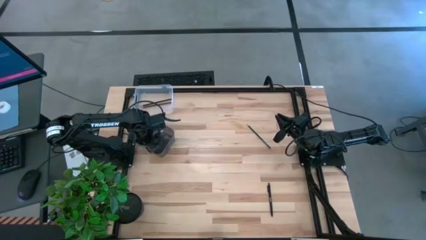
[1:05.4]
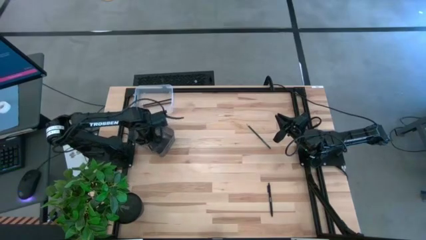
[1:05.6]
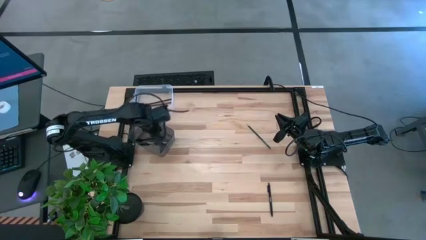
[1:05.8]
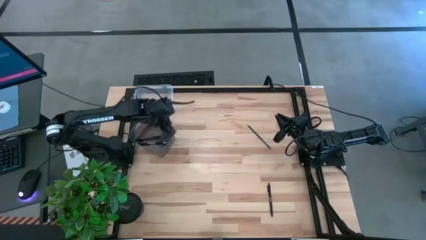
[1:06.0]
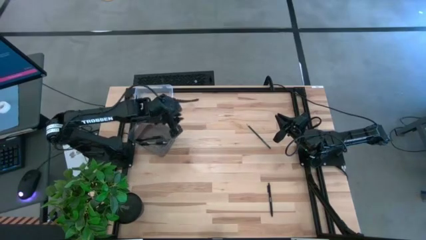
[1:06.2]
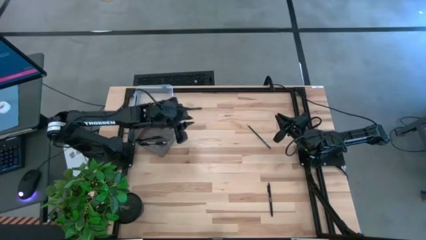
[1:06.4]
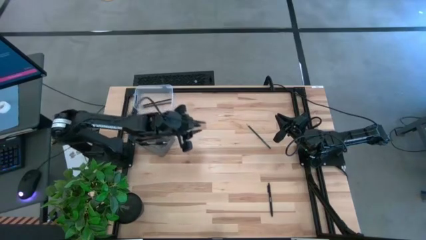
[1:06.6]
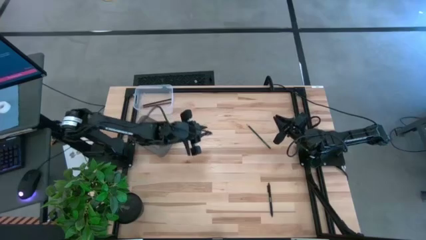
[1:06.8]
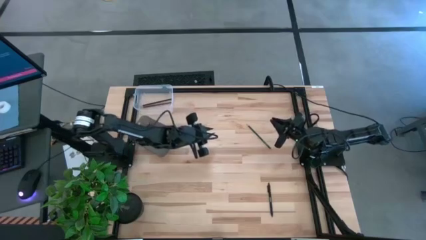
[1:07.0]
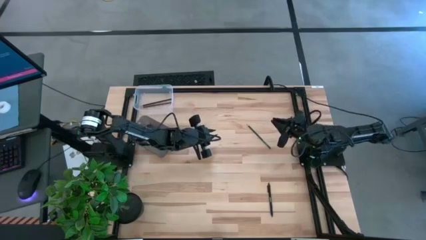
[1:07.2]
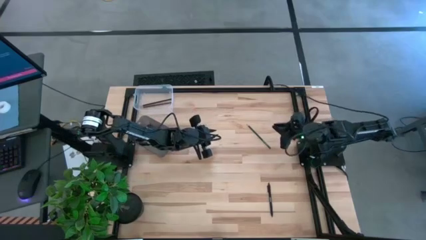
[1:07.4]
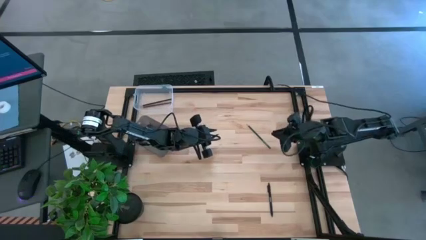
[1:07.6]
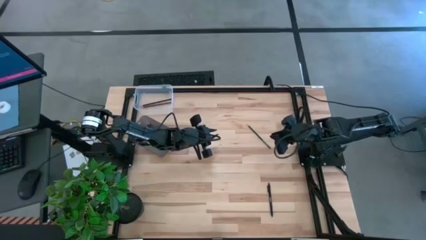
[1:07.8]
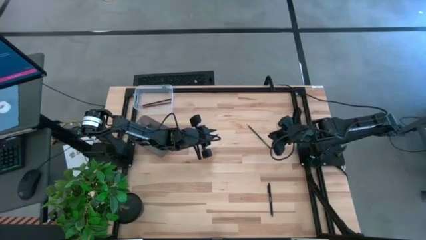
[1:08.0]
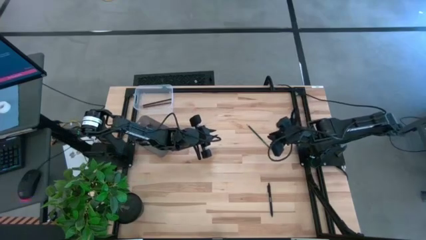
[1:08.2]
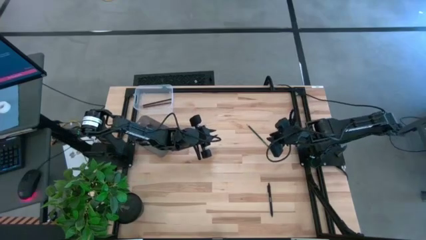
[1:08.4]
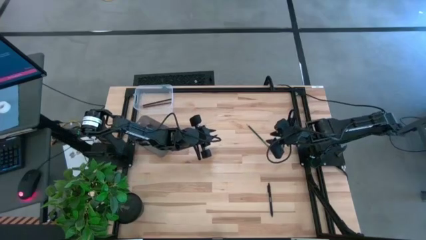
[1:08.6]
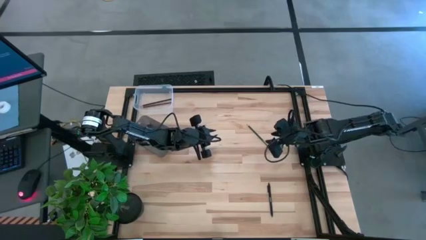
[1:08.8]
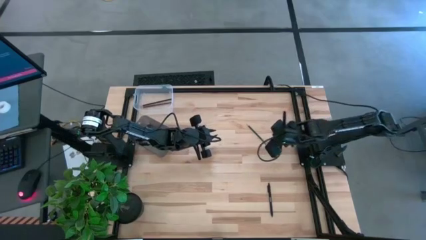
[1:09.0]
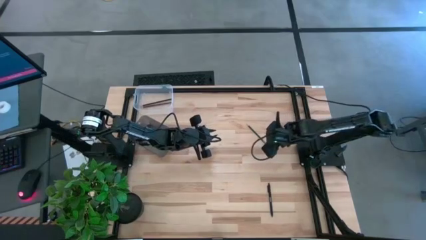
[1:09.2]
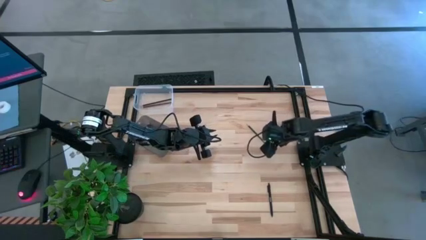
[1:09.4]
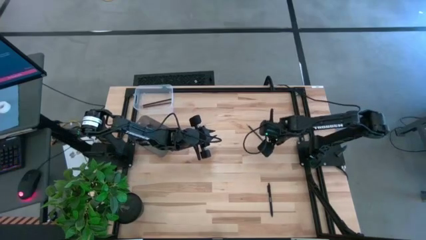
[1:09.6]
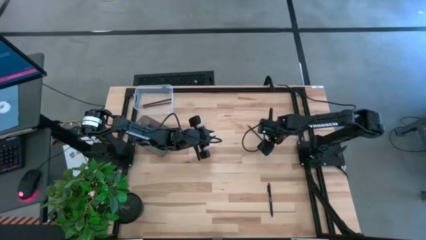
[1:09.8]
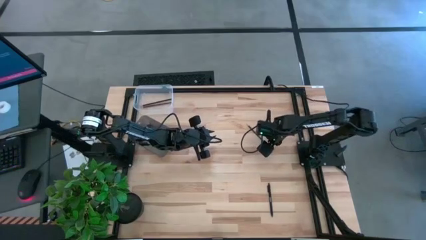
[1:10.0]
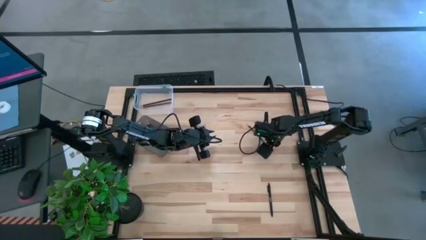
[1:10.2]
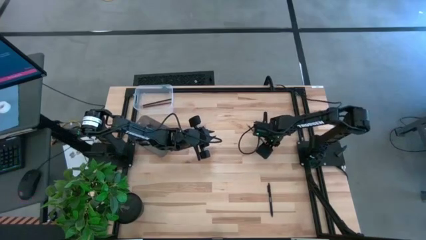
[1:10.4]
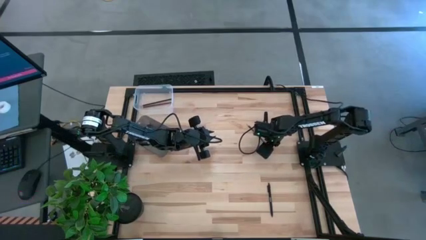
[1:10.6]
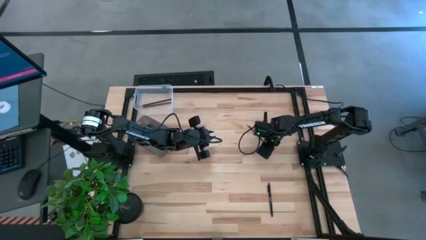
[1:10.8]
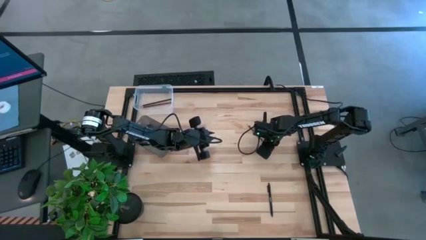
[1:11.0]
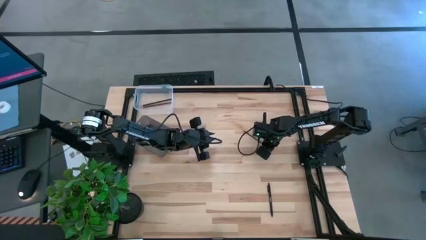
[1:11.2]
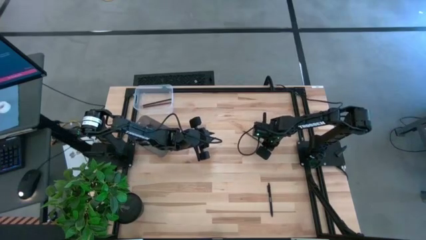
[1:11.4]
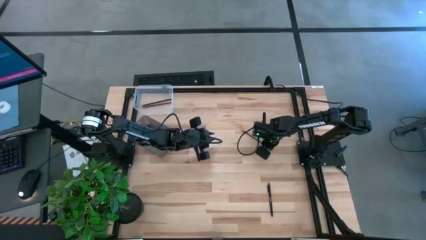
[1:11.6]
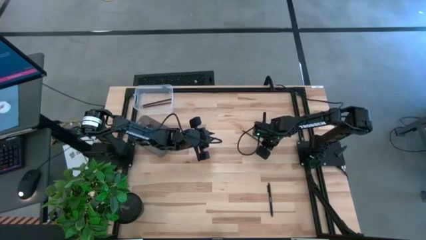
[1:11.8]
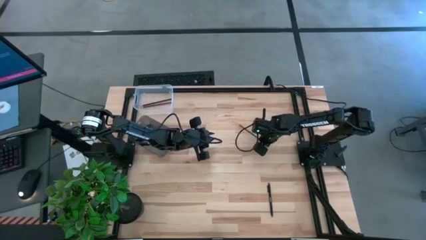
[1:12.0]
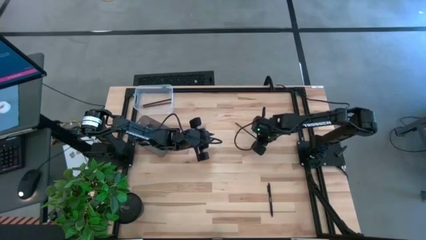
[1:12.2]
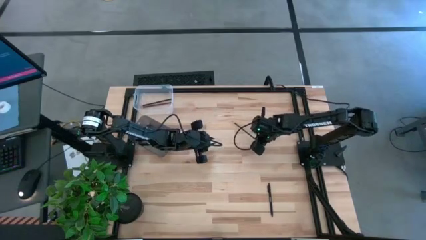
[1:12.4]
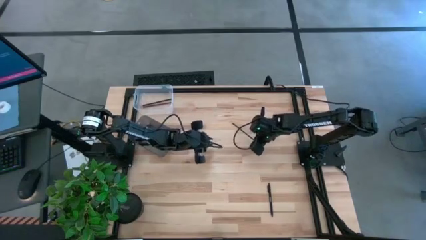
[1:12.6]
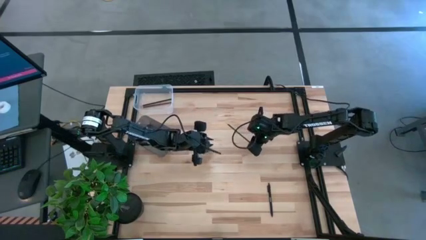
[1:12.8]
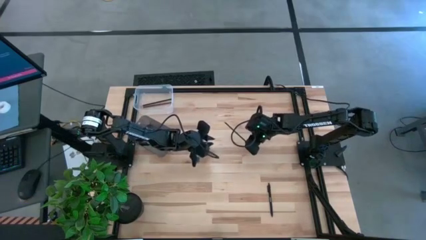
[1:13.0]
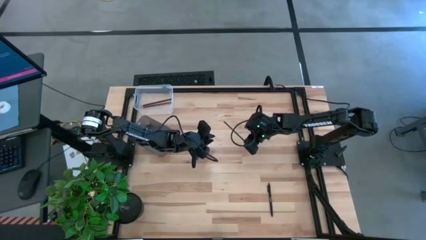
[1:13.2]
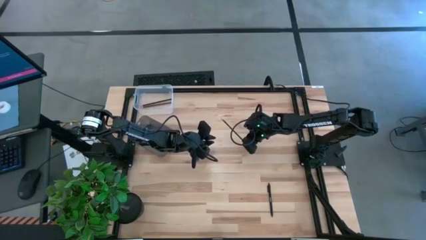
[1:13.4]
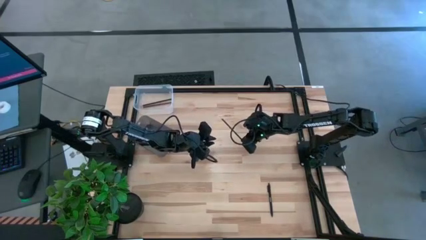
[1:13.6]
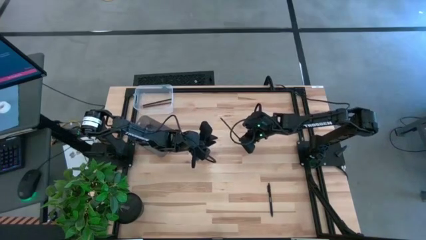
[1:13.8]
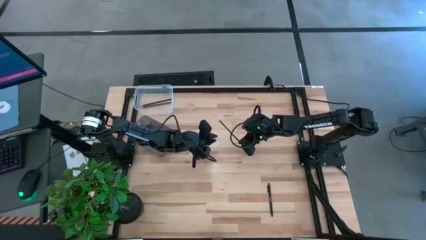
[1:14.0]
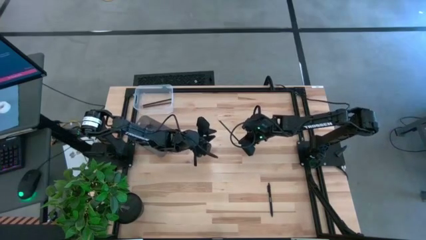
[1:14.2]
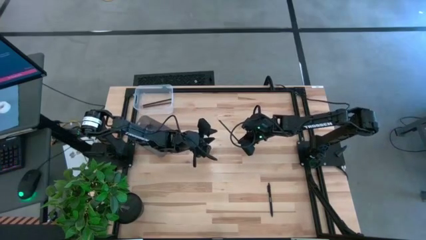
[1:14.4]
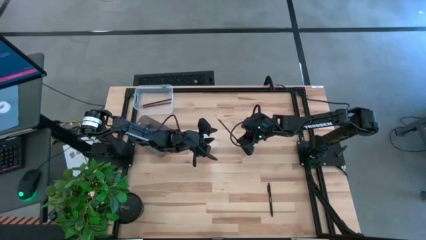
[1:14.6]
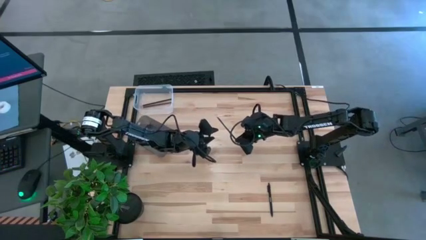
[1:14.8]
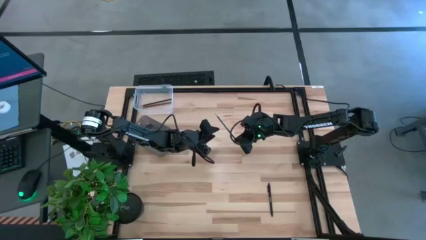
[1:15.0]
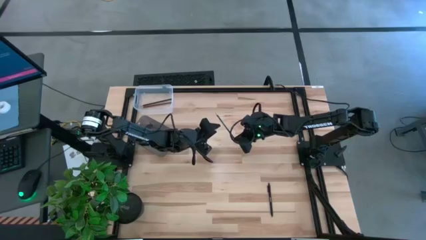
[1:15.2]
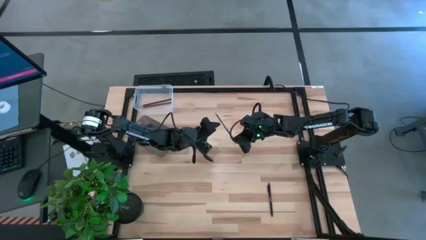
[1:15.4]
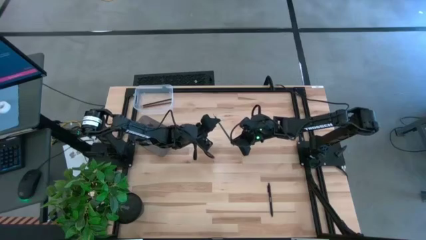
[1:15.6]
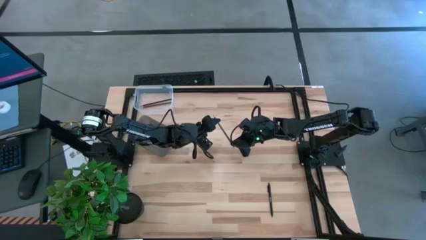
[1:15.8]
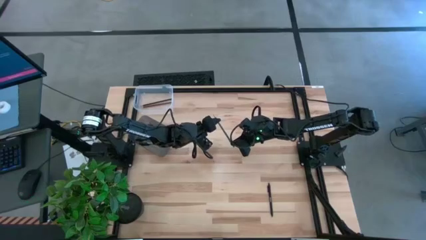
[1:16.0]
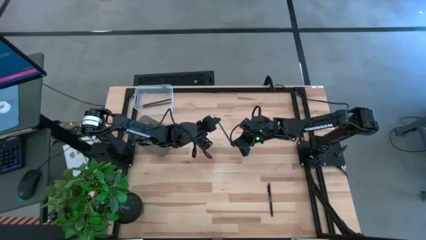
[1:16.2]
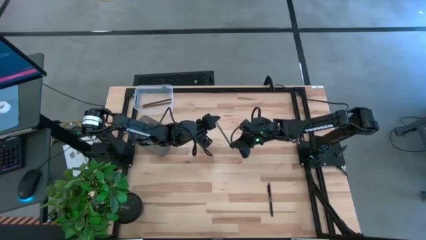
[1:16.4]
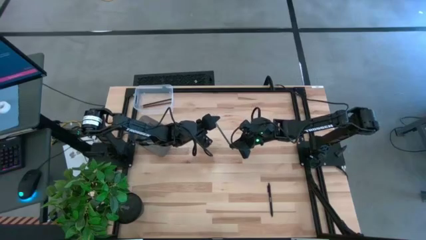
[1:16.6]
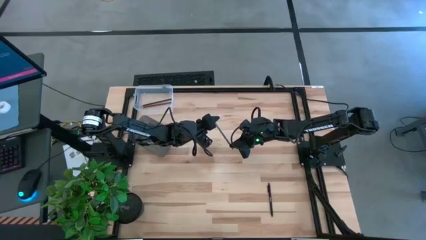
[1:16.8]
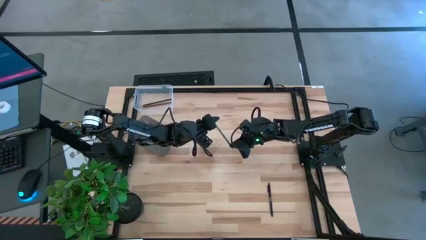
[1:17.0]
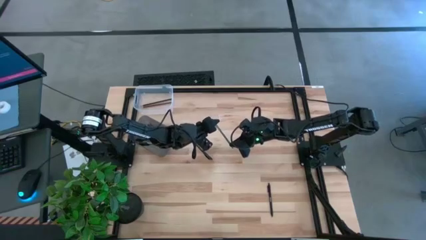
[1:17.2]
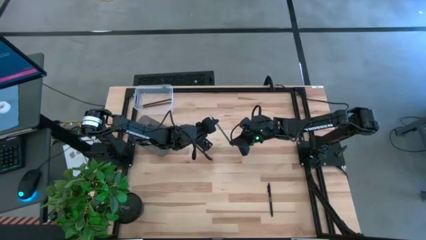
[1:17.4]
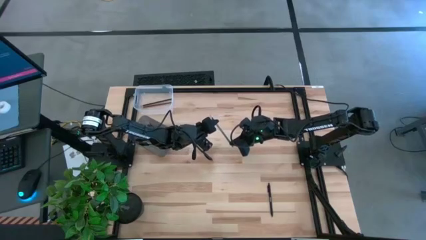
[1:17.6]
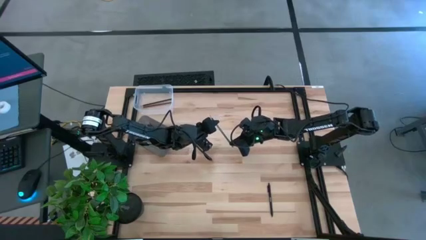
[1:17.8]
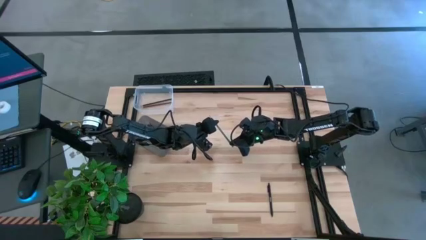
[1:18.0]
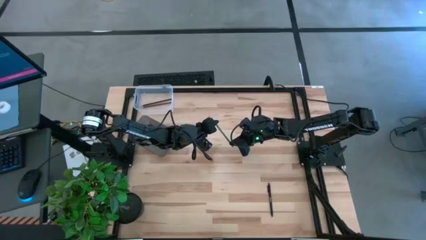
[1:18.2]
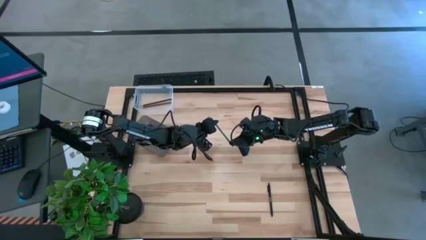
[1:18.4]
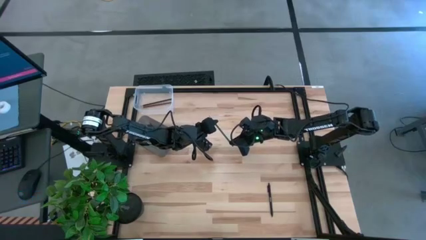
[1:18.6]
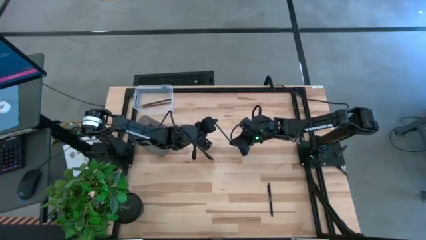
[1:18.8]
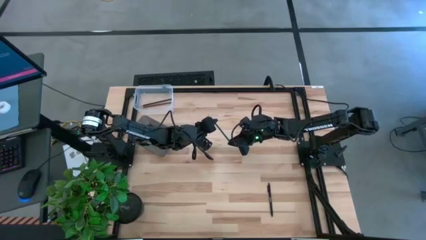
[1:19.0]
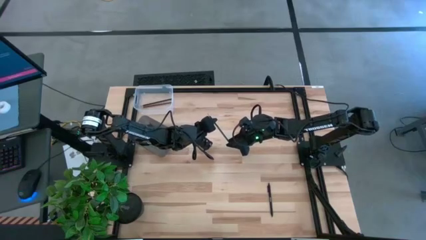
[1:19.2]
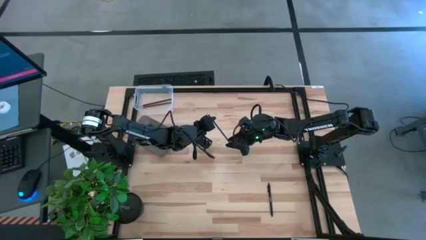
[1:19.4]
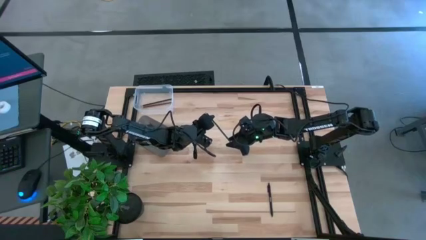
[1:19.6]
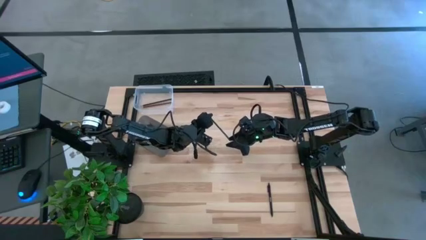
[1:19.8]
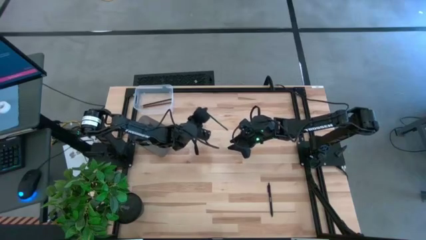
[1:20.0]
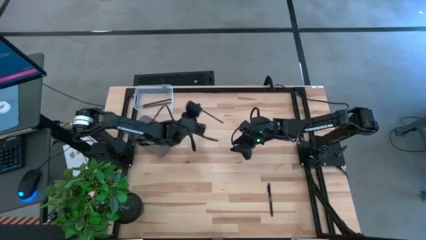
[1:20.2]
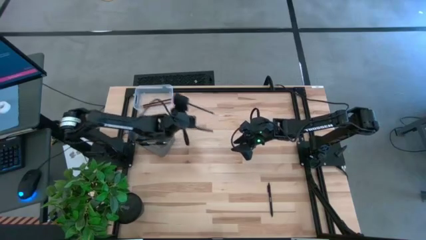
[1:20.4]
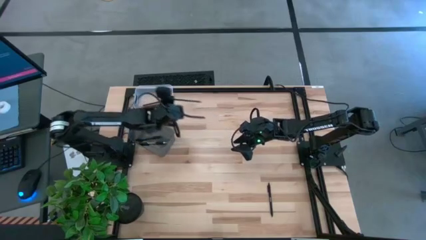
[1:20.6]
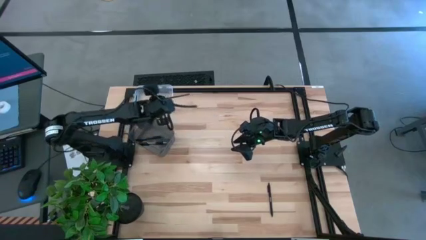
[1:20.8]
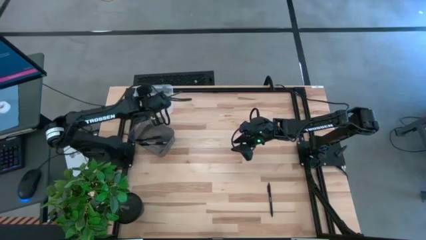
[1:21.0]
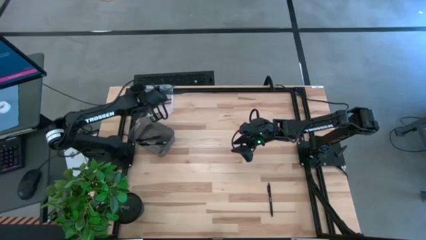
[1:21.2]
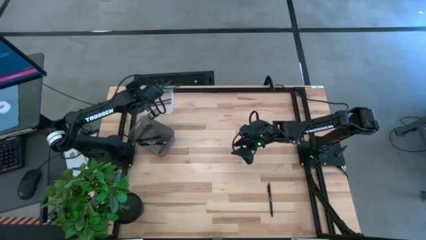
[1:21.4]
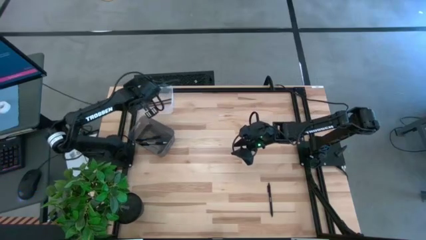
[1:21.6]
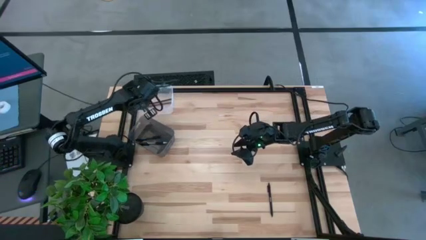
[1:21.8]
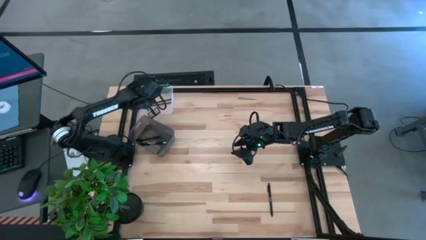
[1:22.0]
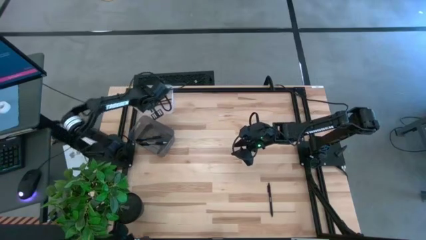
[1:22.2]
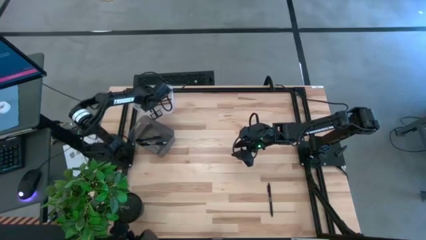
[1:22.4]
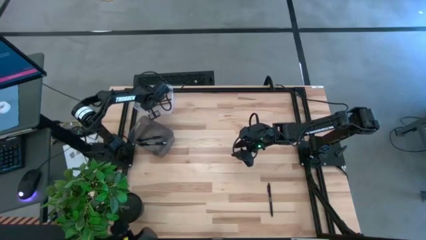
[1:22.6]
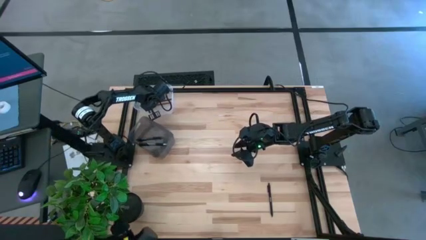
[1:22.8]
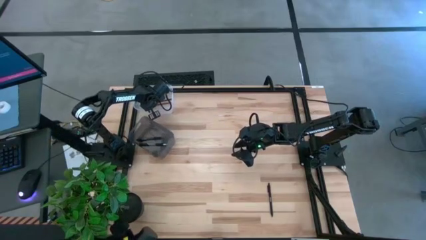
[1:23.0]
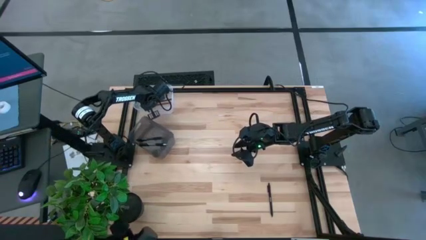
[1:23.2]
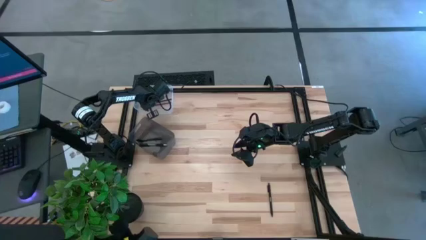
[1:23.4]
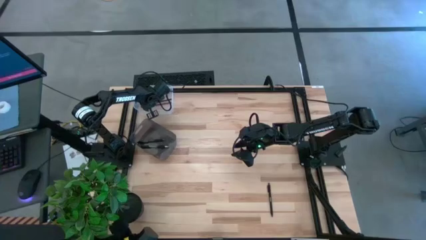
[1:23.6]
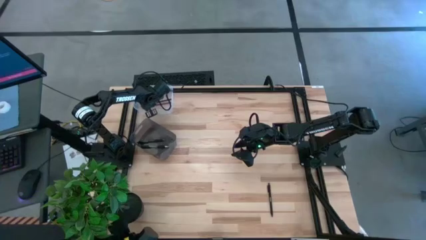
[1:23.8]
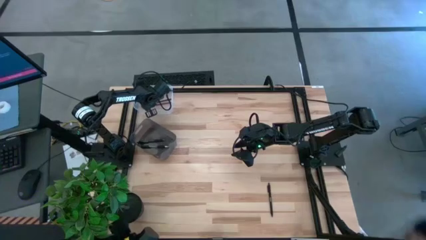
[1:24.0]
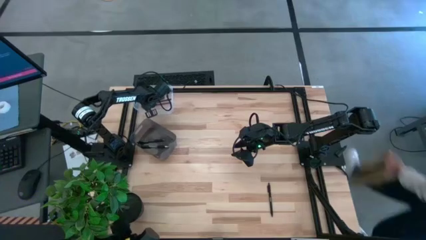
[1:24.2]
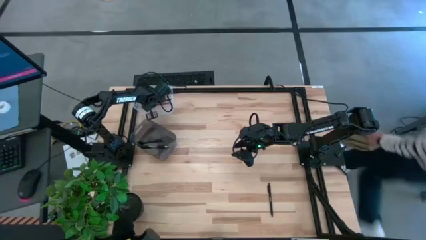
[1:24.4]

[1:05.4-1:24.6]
Task: Sort pens & pencils
Put the green pencil into the white bin
